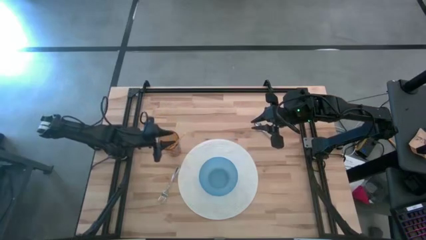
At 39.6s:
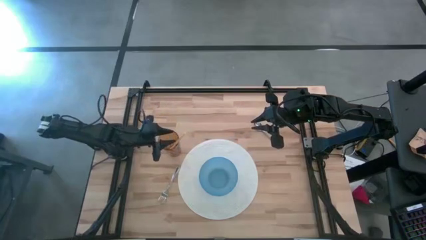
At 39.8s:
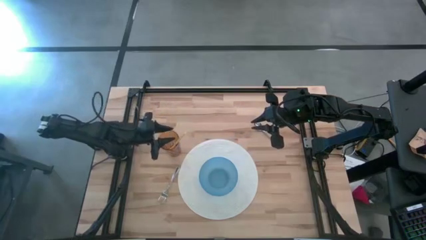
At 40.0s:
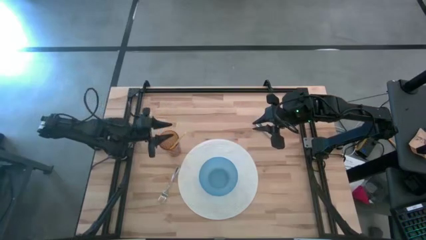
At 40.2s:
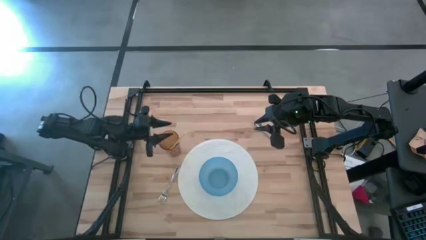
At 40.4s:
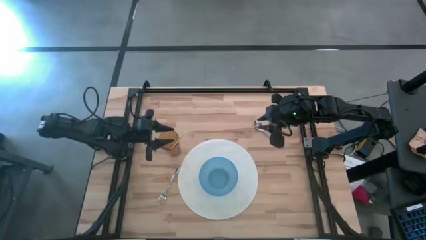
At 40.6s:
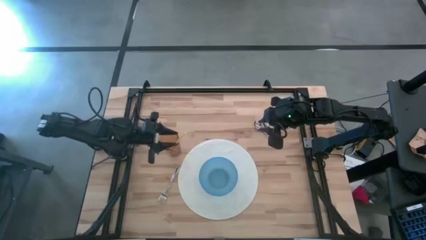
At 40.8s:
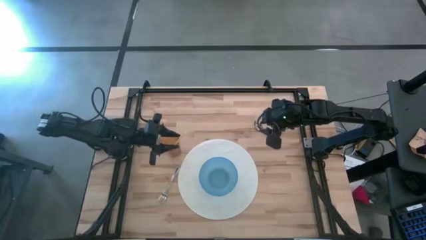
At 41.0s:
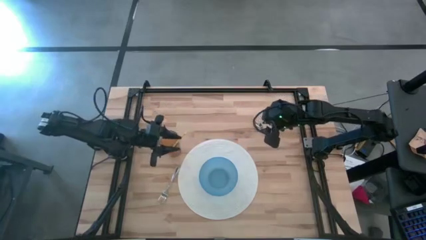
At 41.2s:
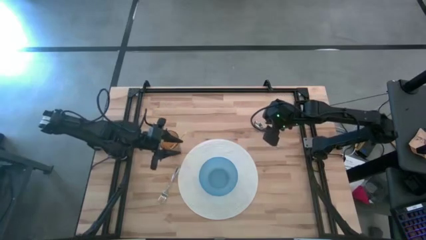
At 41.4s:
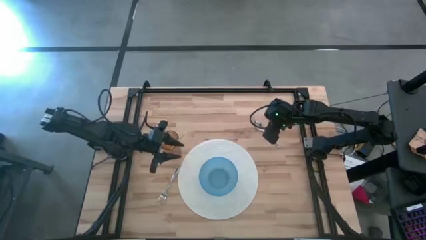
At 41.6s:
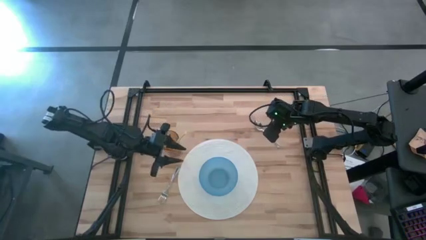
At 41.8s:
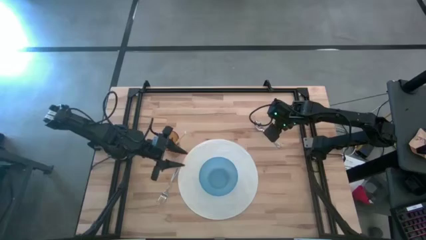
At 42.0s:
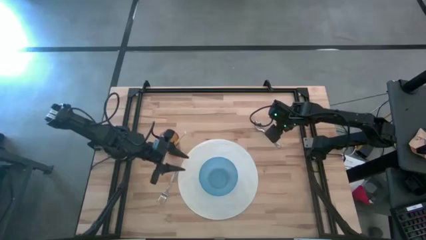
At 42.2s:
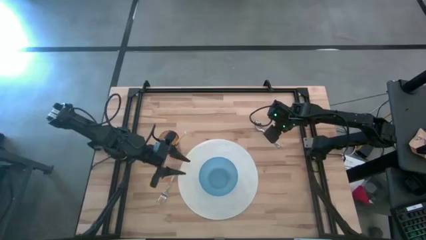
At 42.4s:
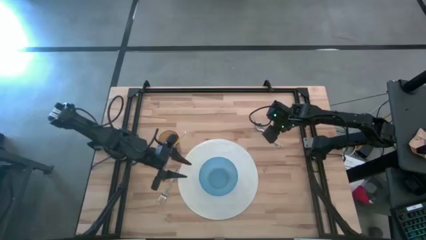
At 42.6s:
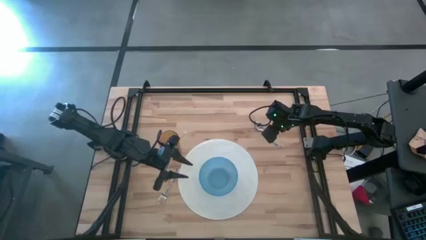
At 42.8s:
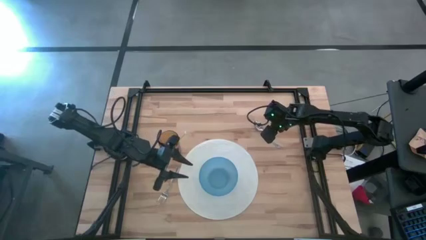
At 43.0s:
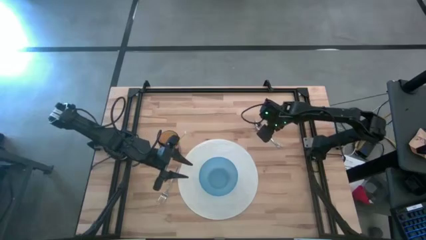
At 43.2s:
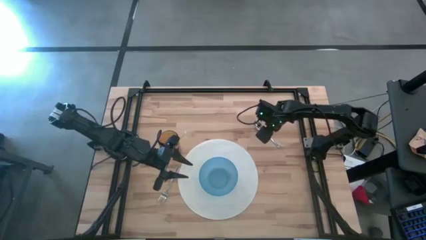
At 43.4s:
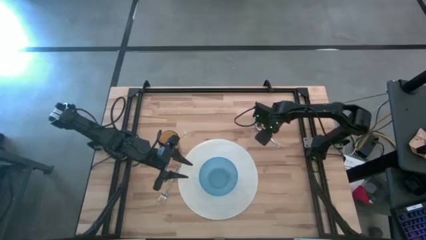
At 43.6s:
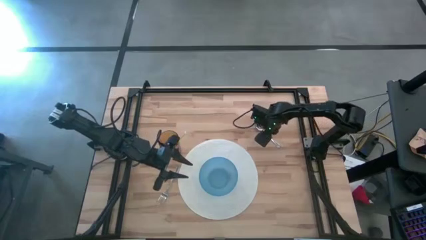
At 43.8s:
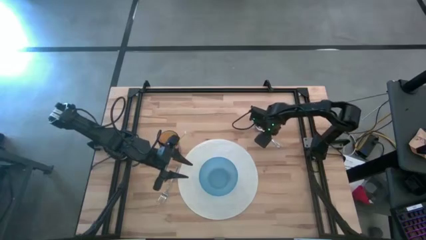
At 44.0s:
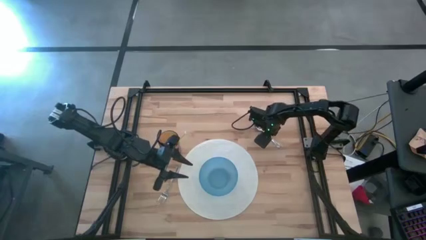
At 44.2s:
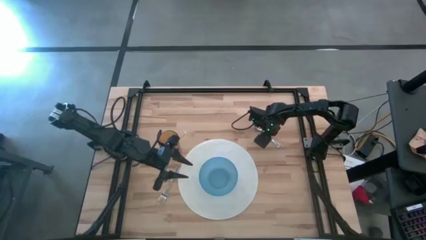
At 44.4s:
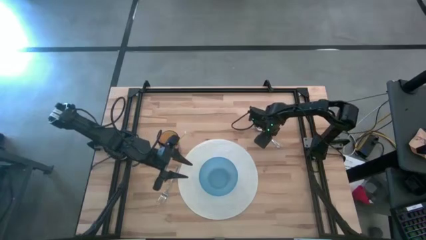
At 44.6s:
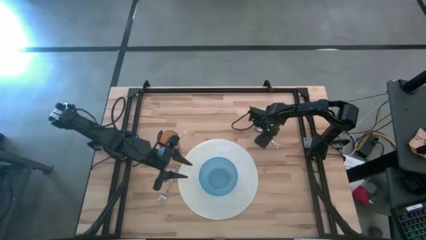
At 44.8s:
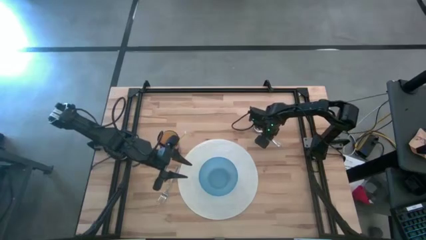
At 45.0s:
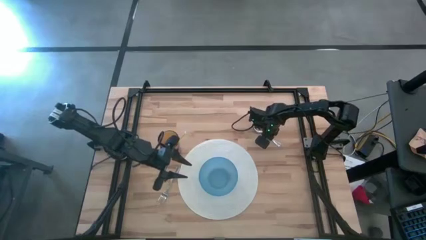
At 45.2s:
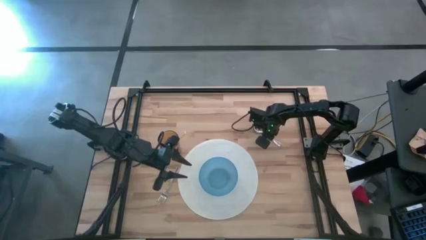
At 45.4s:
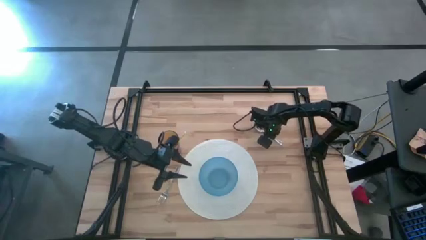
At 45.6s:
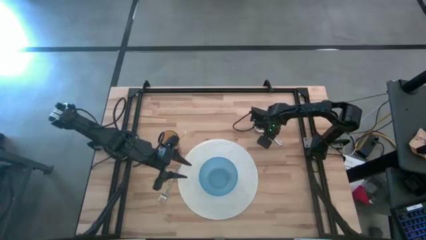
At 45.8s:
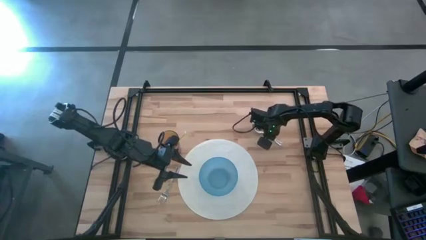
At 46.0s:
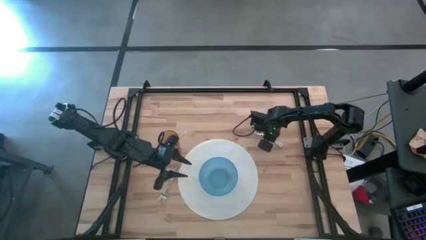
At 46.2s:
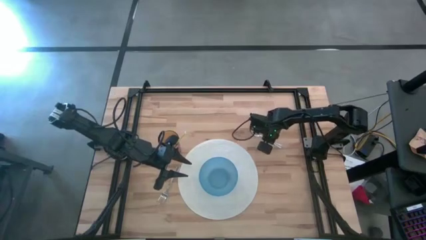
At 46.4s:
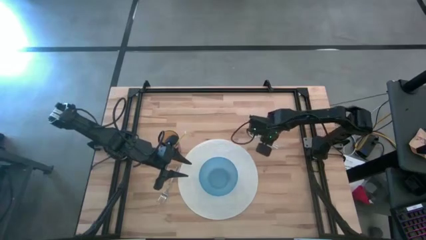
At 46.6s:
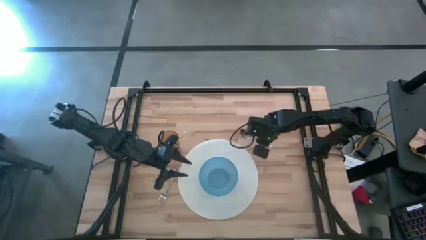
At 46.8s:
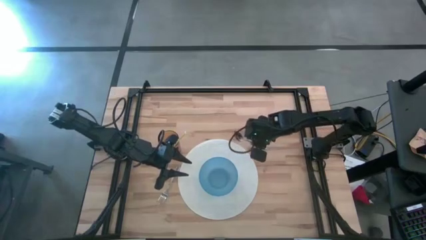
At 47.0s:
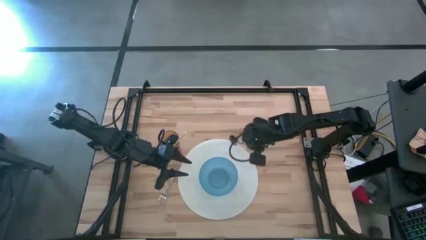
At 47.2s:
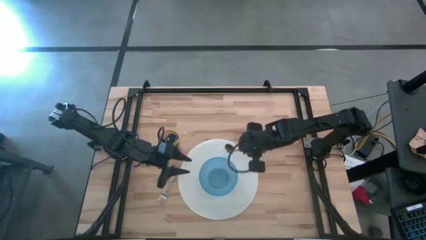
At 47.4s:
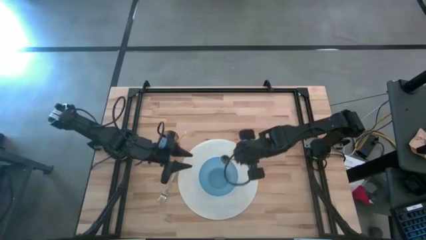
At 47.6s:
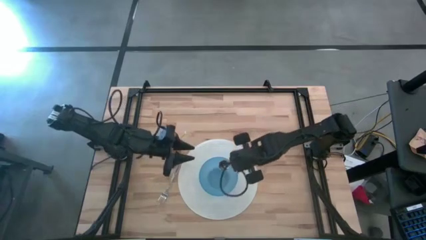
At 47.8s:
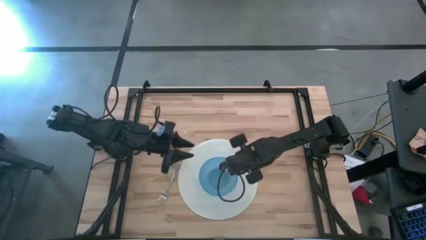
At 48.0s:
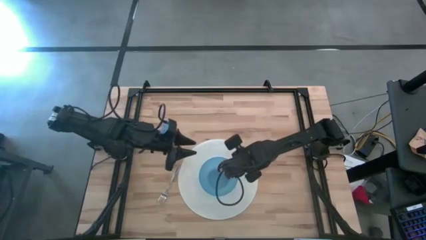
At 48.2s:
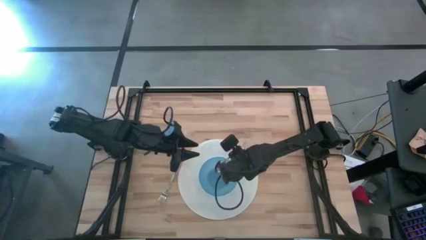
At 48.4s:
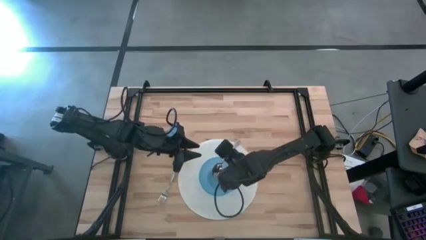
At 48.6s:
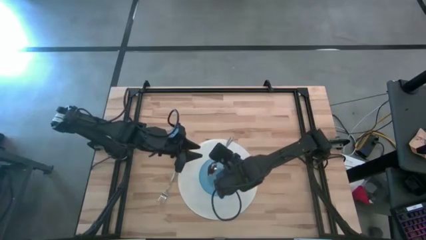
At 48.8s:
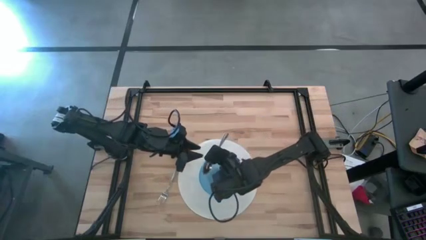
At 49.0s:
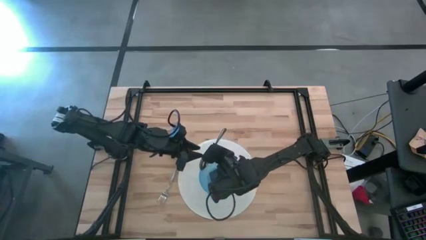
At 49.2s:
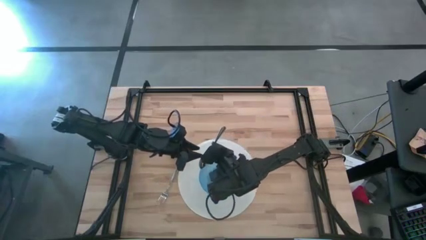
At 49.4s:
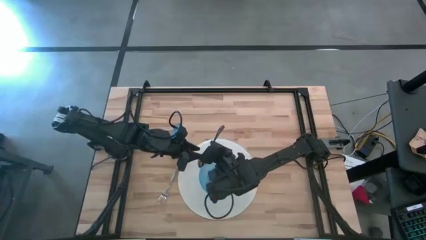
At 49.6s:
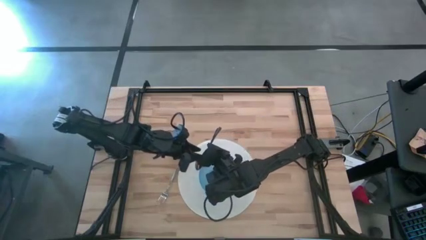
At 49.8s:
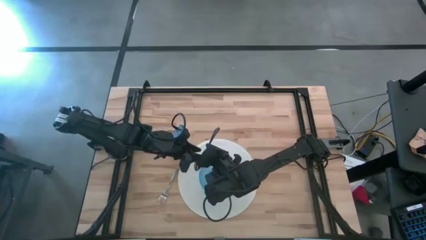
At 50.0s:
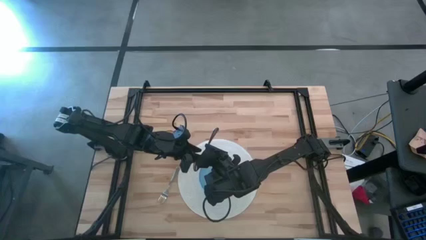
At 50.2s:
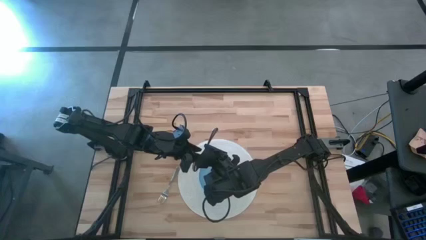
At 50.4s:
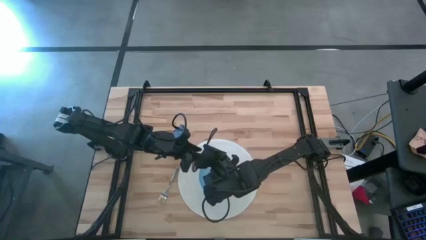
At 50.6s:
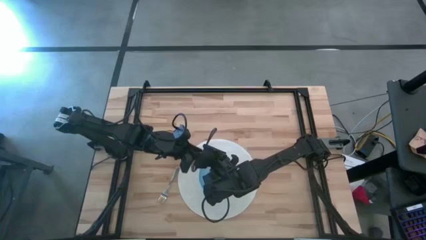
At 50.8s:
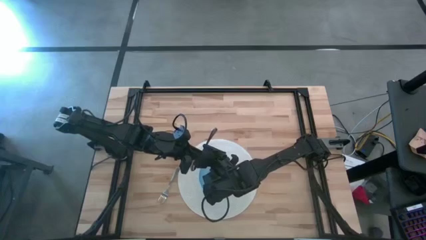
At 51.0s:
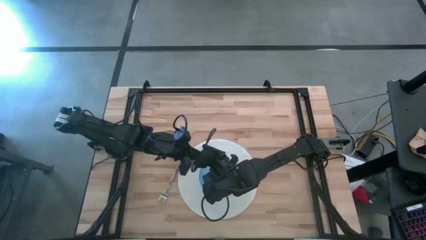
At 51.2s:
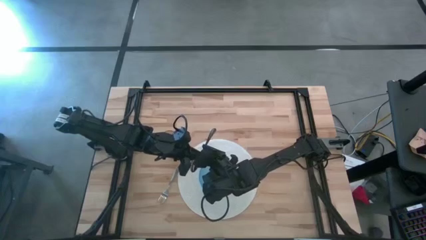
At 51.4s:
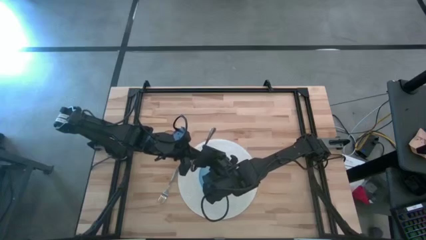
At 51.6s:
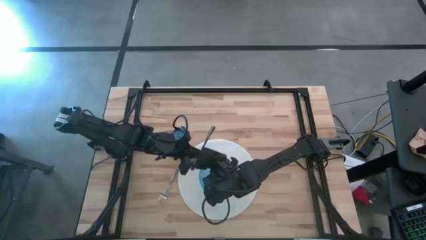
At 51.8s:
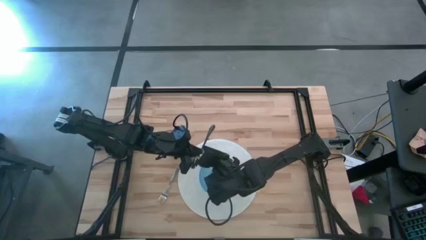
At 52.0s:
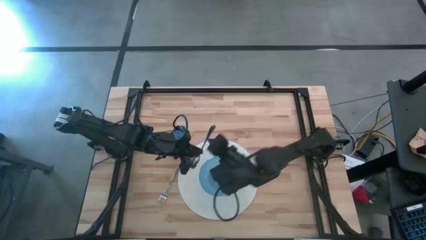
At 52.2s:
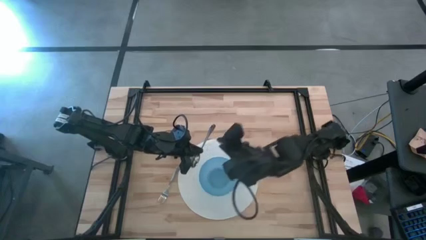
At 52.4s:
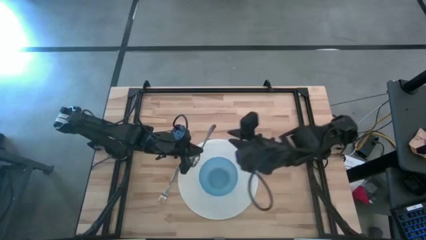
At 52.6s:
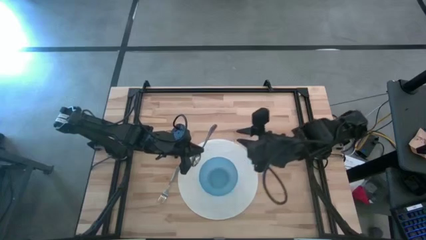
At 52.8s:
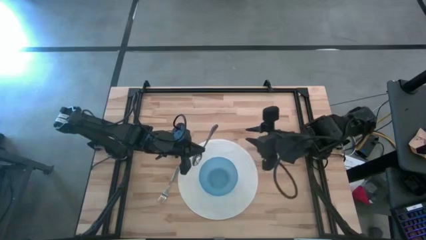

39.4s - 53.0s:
Task: Pick & Place Utensil
Put the spoon into the blue bowl
